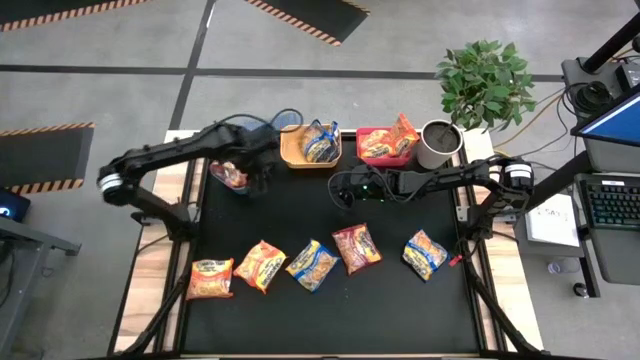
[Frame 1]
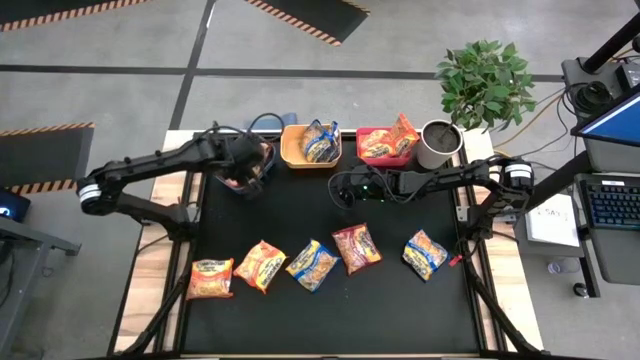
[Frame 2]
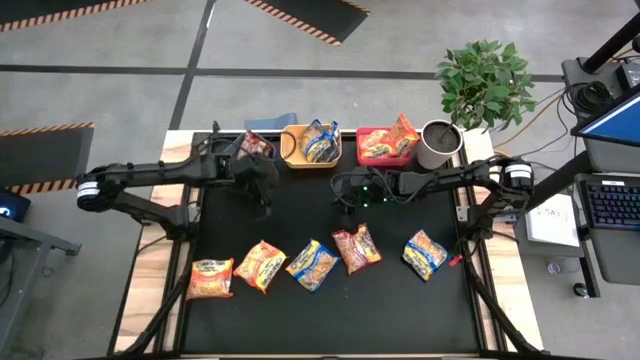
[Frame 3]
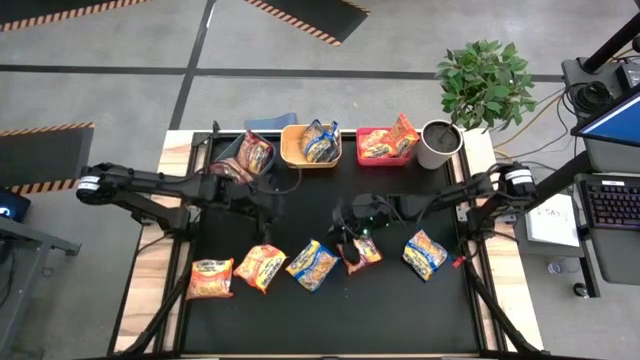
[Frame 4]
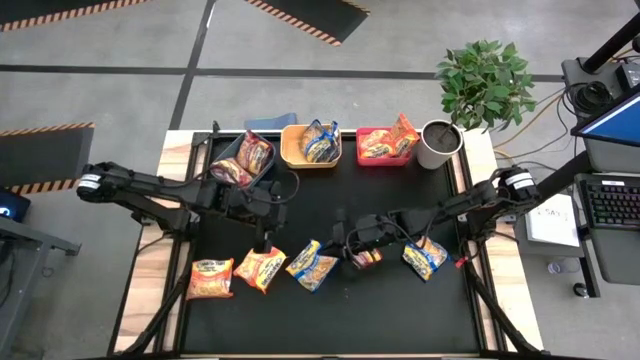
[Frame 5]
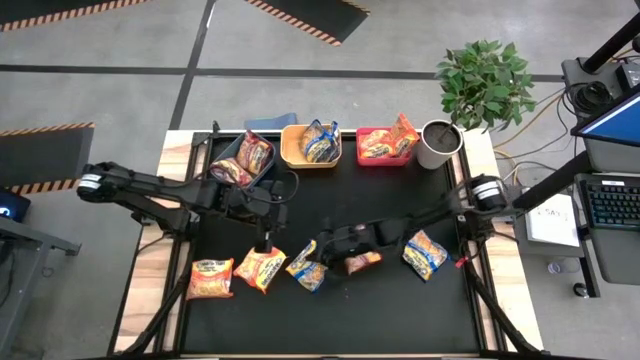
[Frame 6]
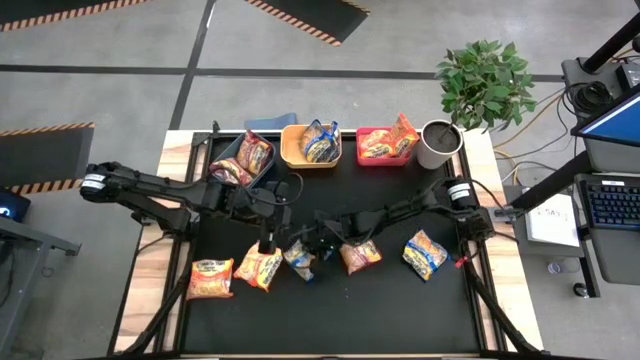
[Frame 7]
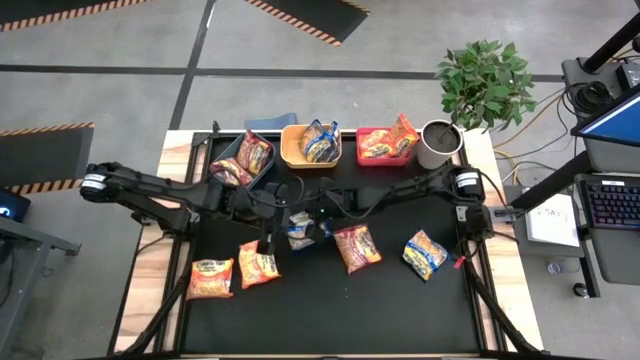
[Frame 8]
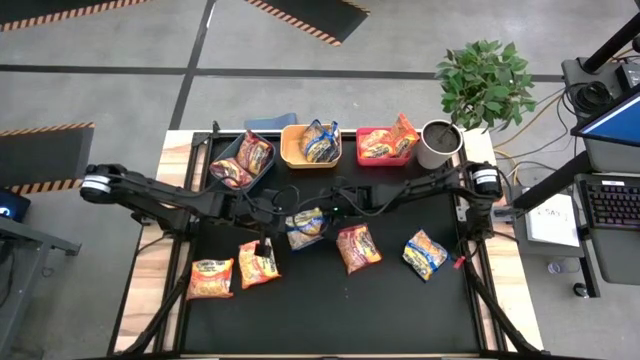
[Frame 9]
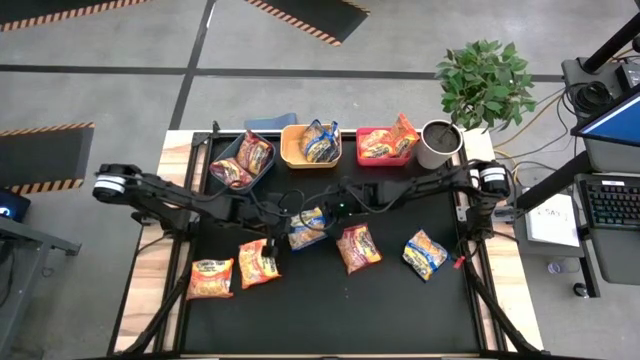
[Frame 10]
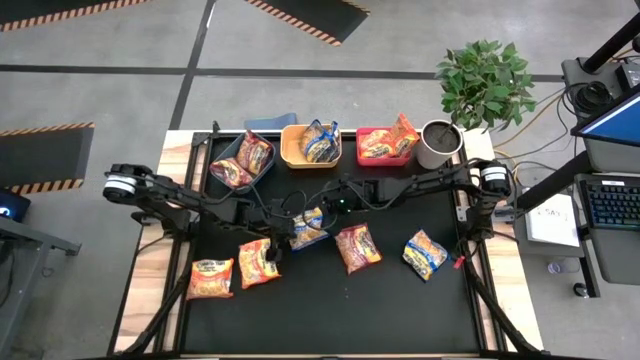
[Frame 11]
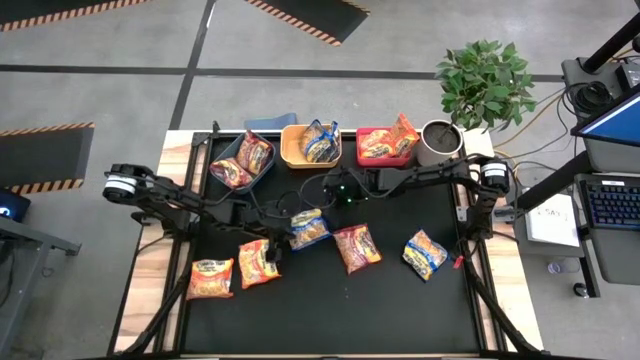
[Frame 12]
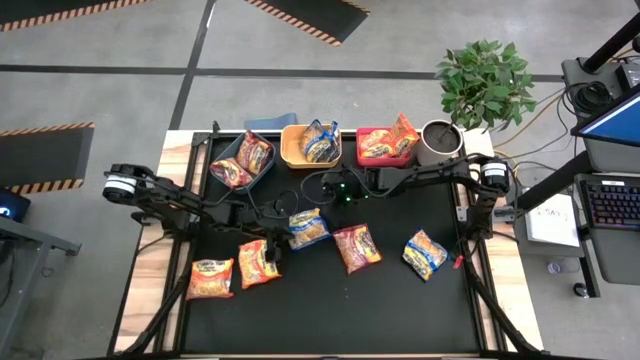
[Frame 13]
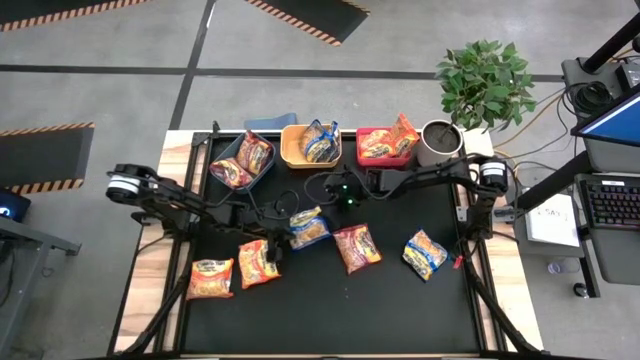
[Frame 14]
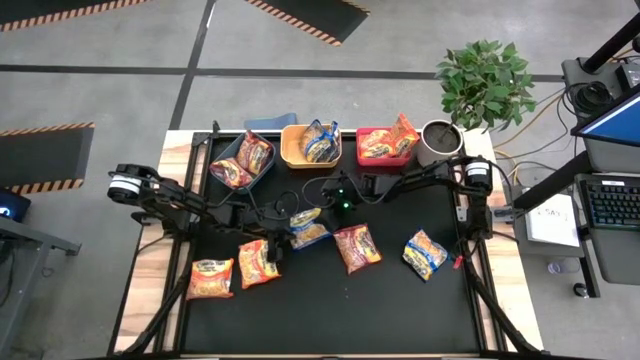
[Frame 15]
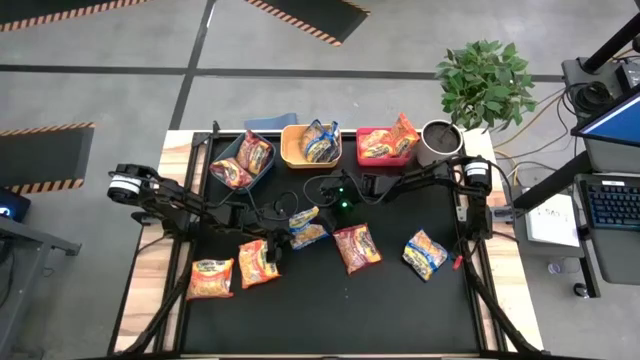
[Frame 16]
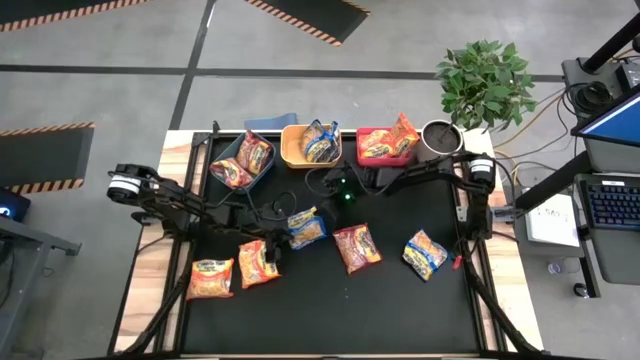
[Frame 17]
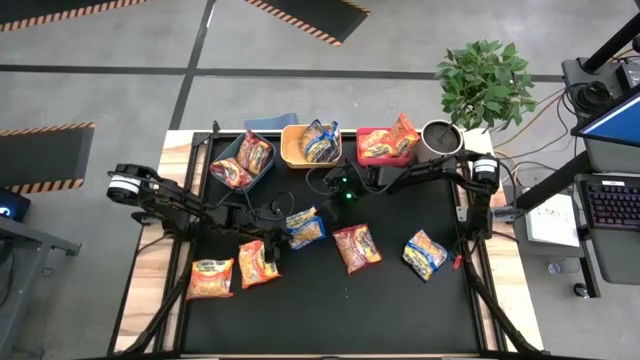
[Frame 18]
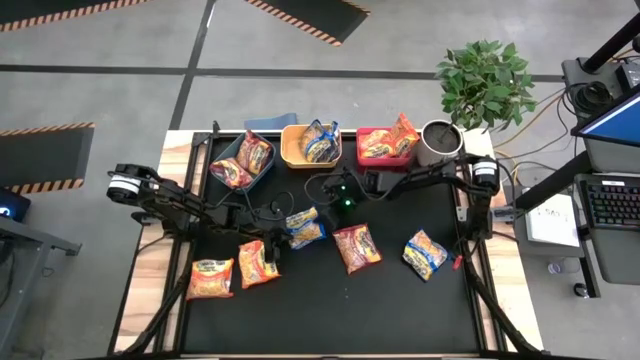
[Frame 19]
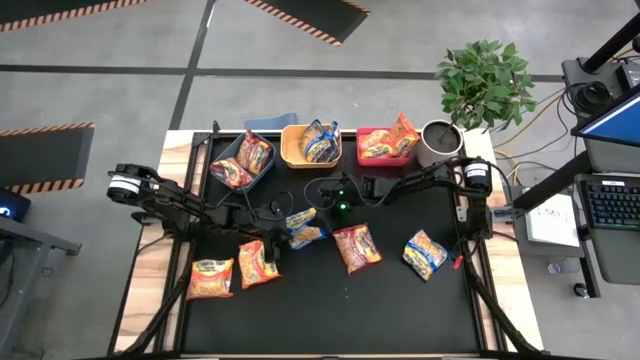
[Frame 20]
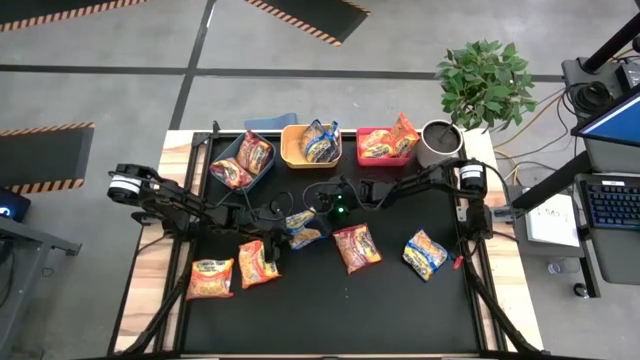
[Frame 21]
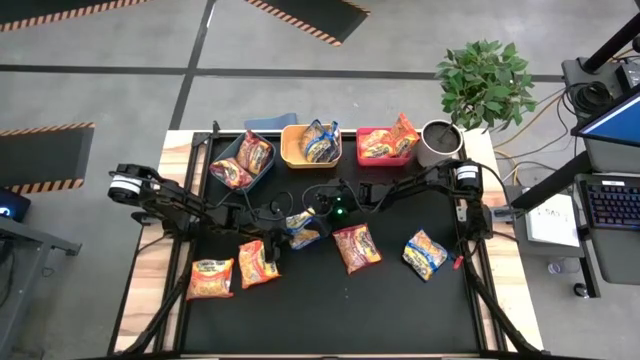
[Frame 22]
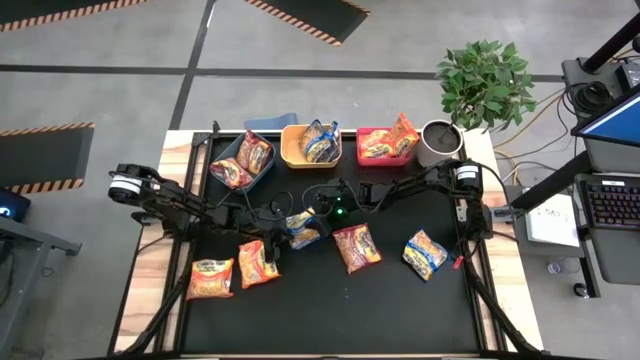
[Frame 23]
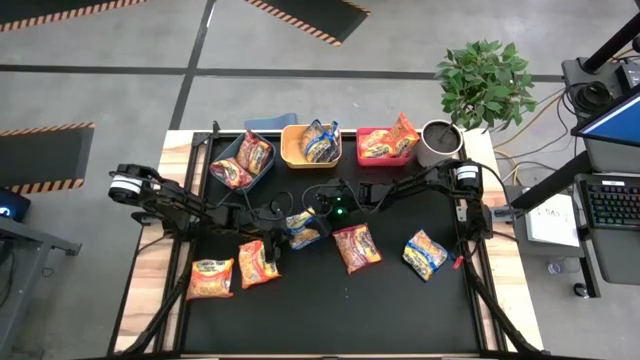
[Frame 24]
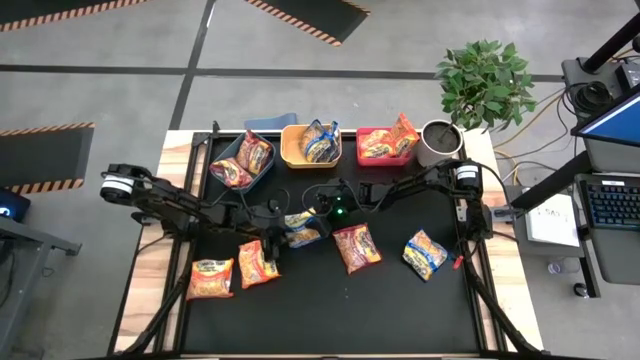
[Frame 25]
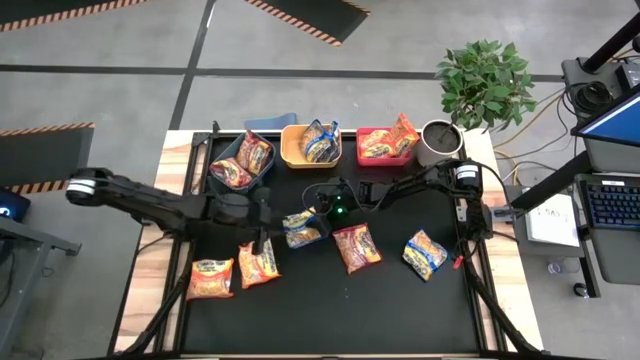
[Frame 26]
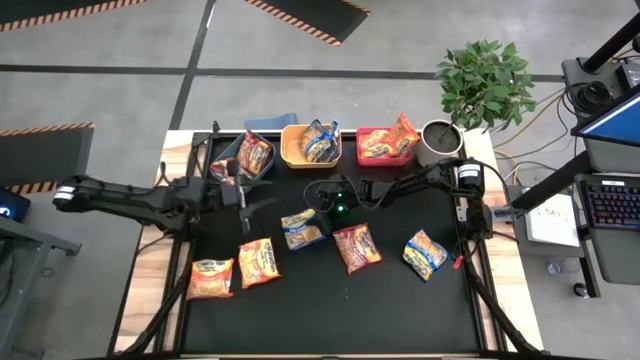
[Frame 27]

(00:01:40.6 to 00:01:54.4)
Task: Sort Maruchan noodles
Put the blue noodle pack into the yellow bin

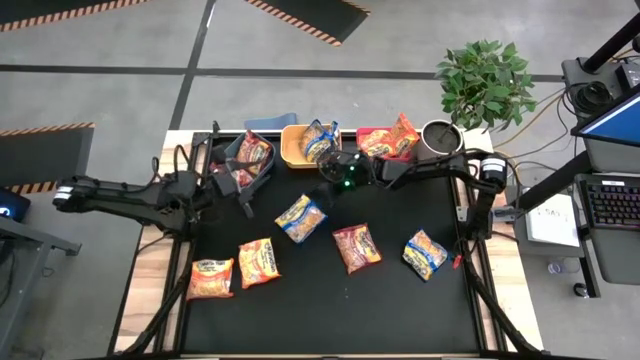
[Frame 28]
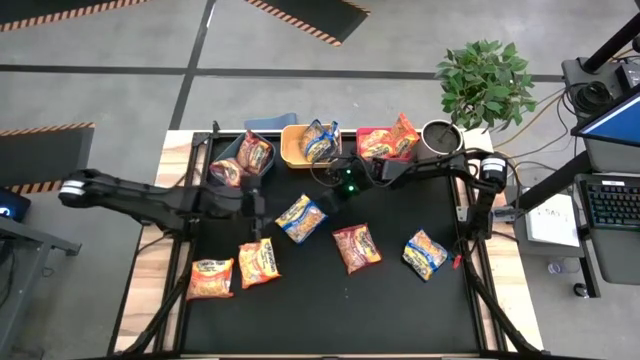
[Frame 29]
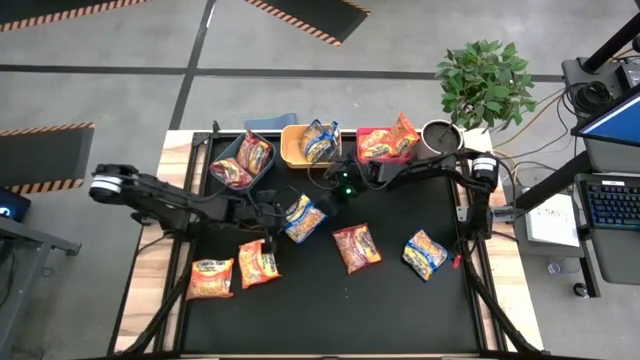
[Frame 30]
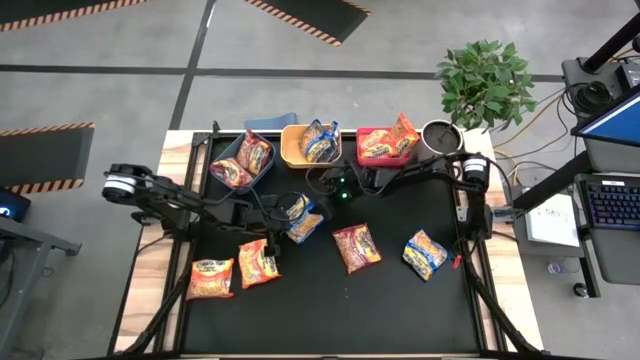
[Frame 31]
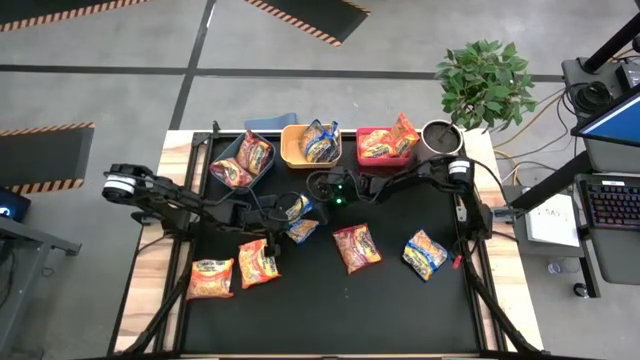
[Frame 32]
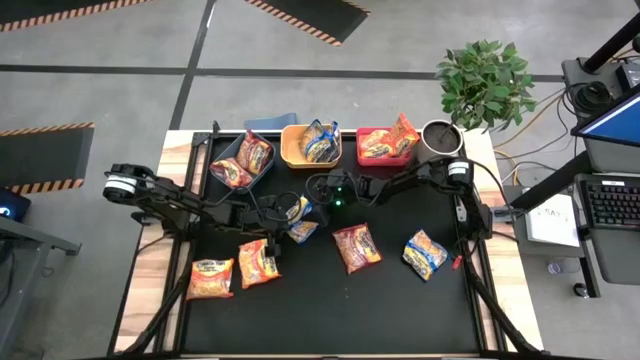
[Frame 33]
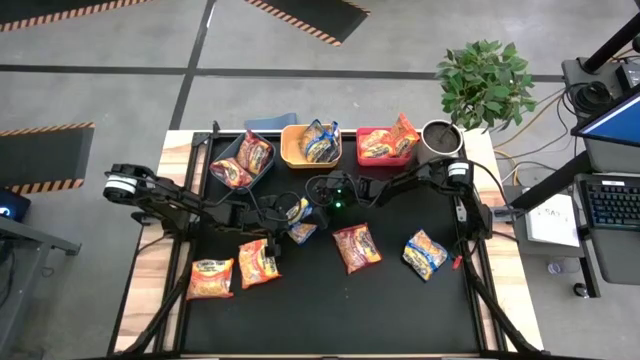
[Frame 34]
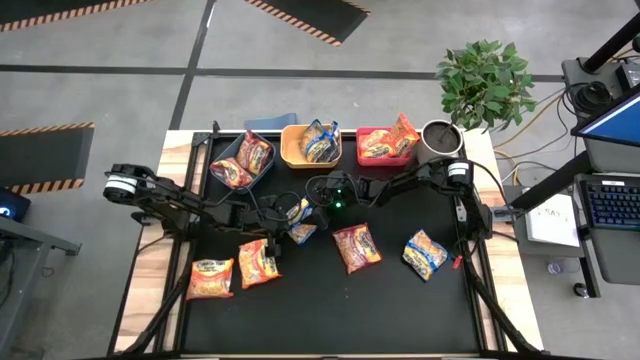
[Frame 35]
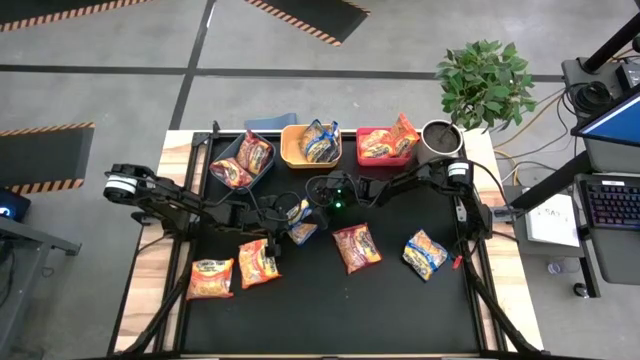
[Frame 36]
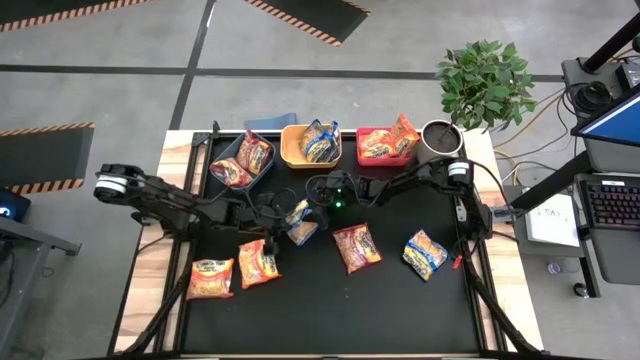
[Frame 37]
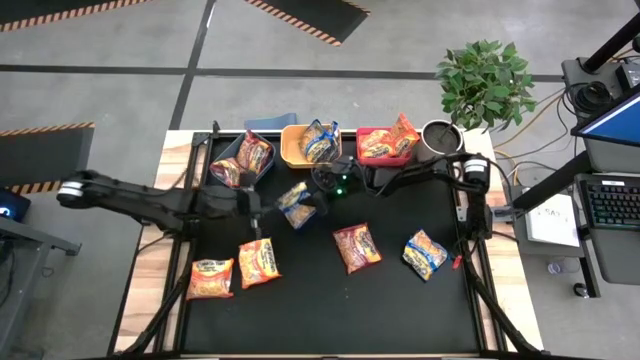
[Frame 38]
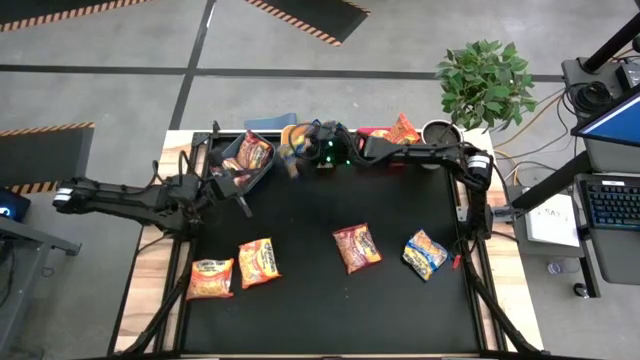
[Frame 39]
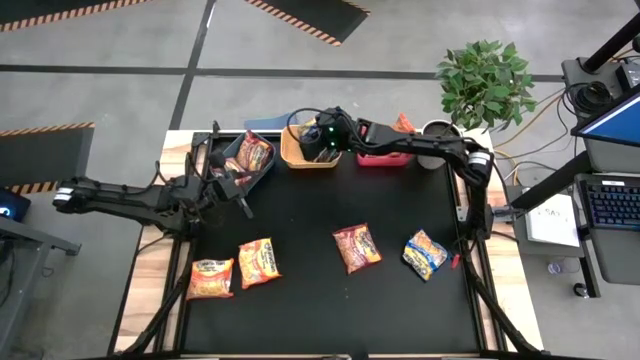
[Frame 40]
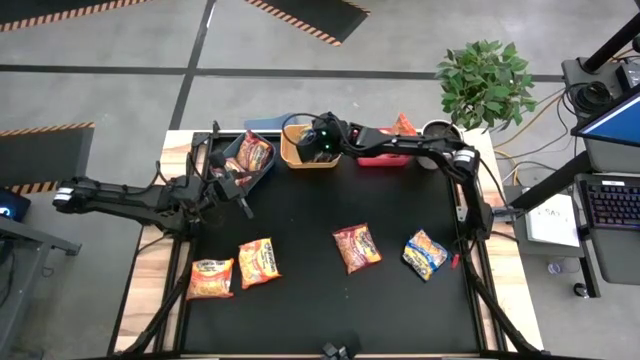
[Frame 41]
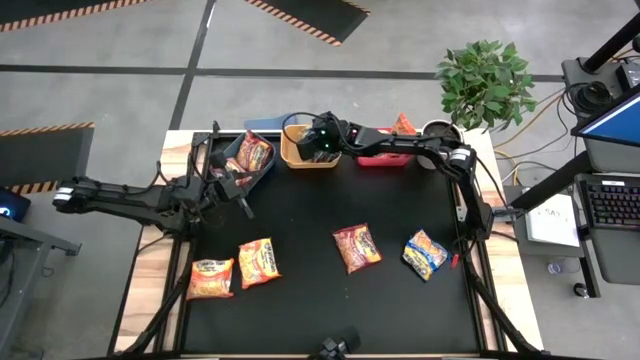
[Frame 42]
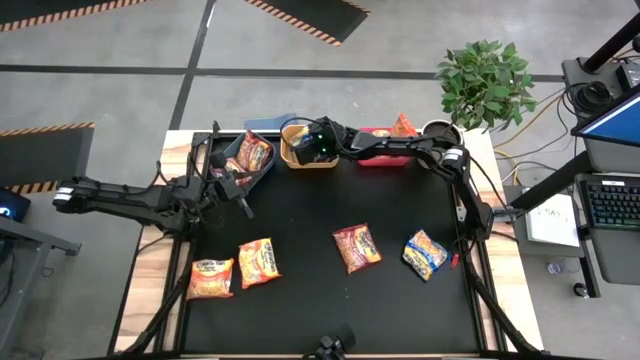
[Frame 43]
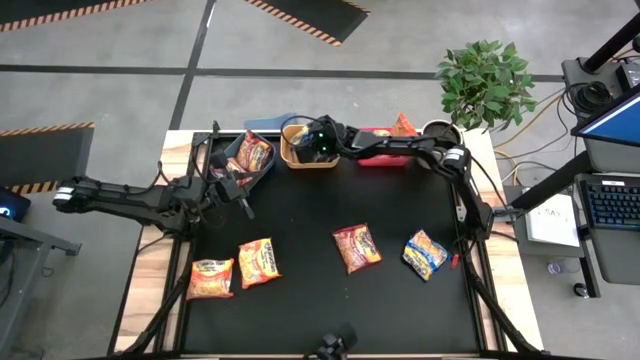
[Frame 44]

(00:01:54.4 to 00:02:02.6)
Put the blue noodle pack into the yellow bin
